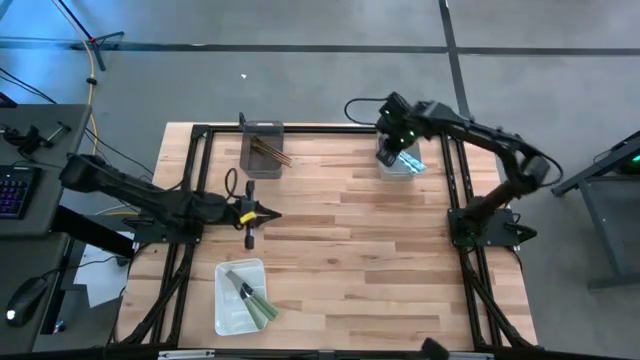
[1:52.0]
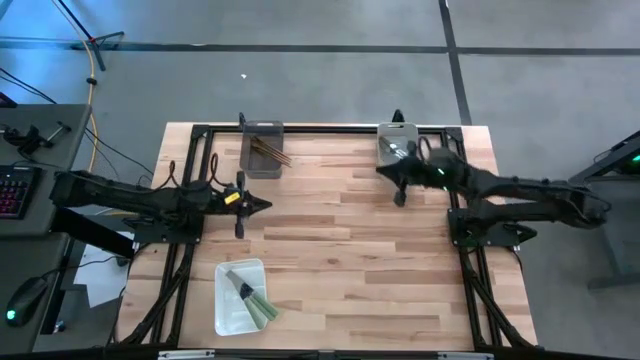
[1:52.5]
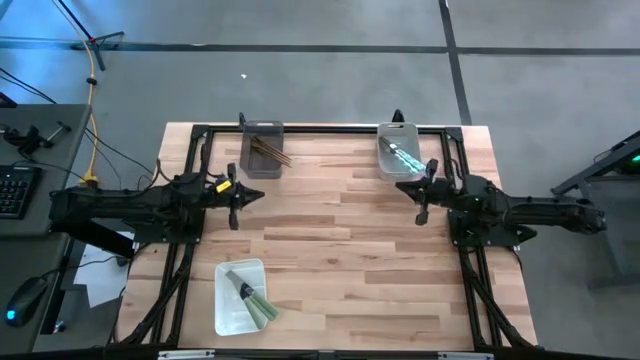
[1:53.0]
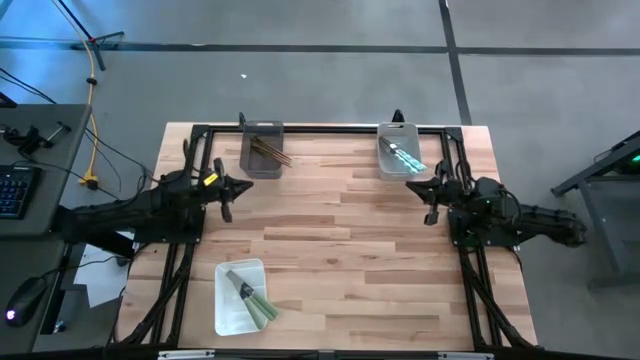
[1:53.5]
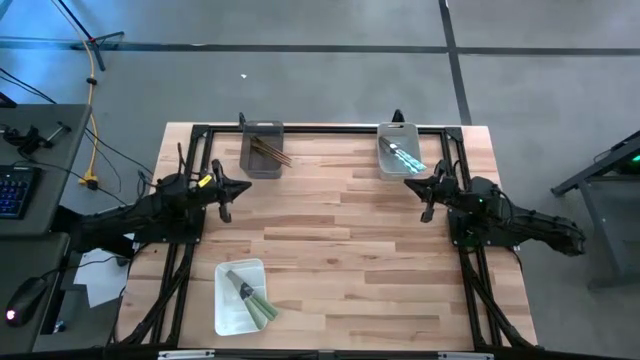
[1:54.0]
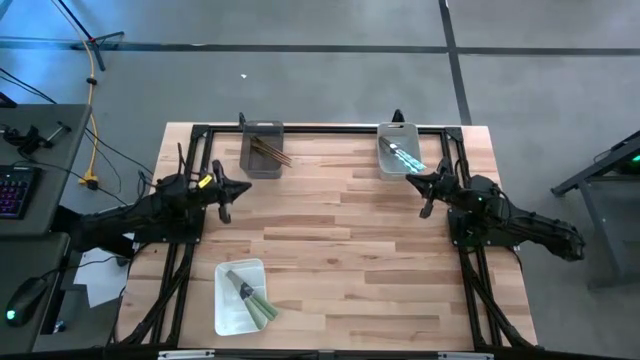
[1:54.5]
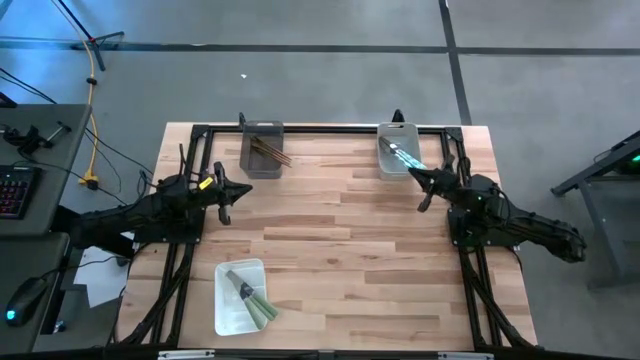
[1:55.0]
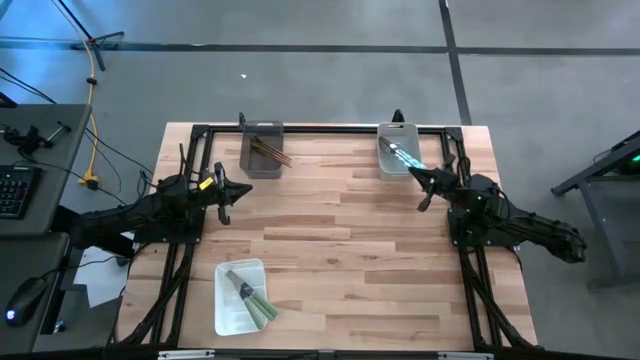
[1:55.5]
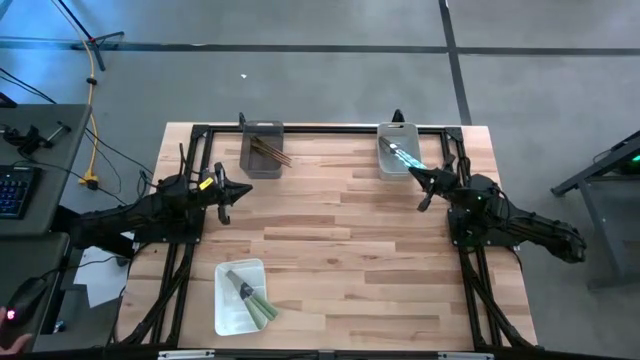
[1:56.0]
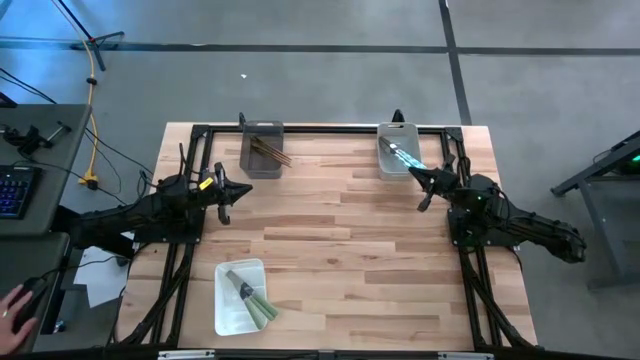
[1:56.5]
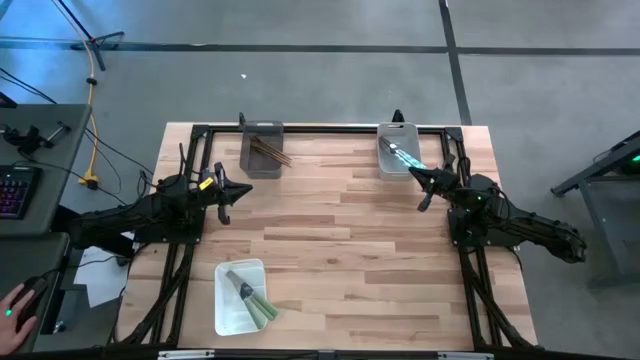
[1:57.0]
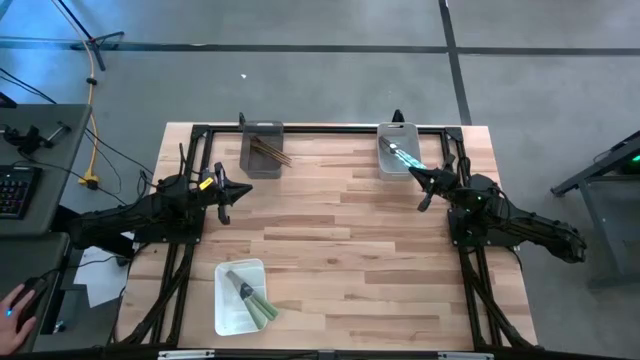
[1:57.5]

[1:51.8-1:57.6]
Task: Sort silverware by color (type)
Return to Home Position

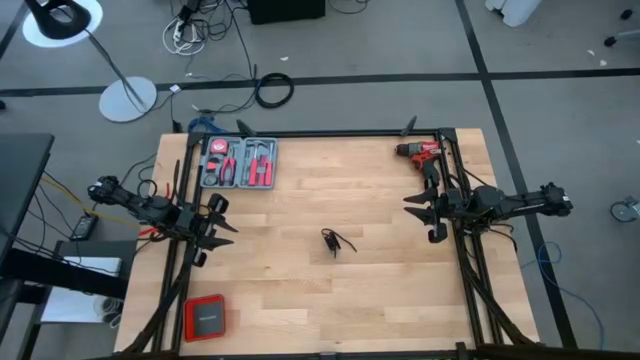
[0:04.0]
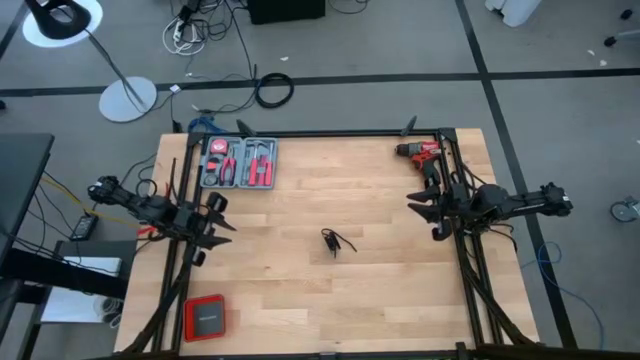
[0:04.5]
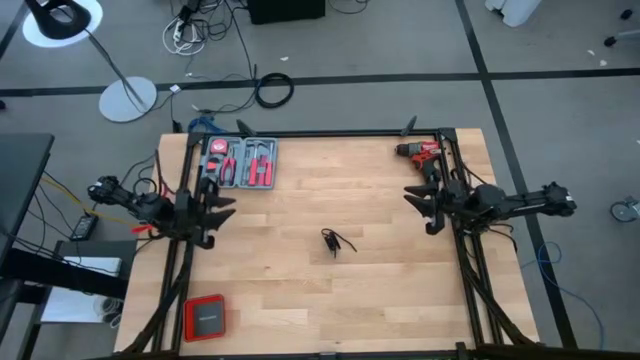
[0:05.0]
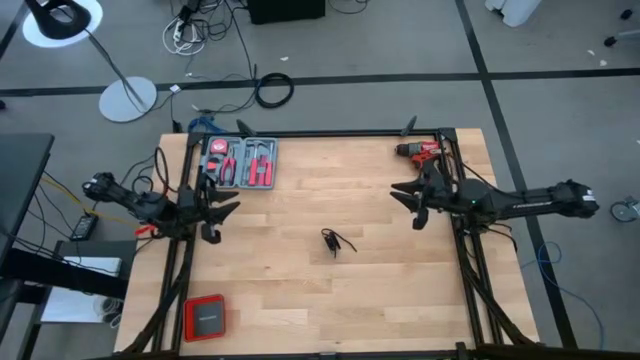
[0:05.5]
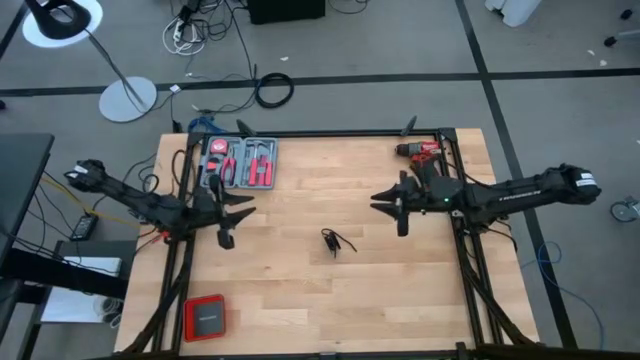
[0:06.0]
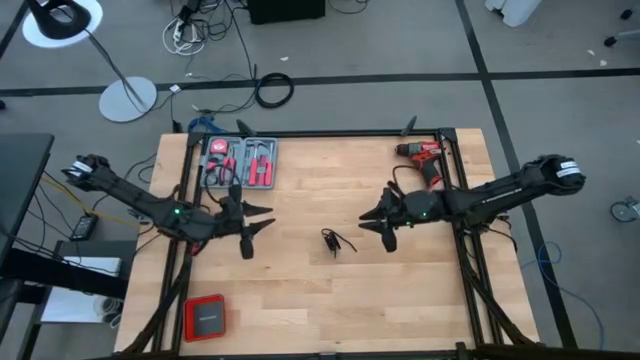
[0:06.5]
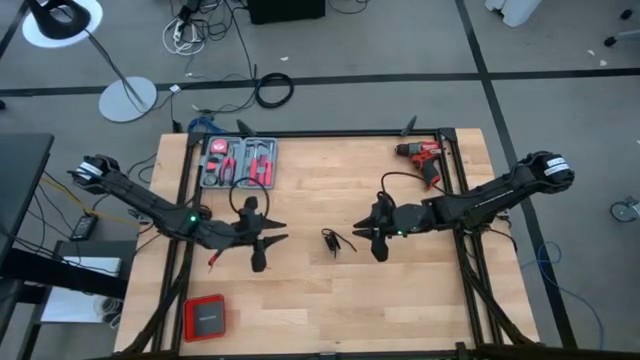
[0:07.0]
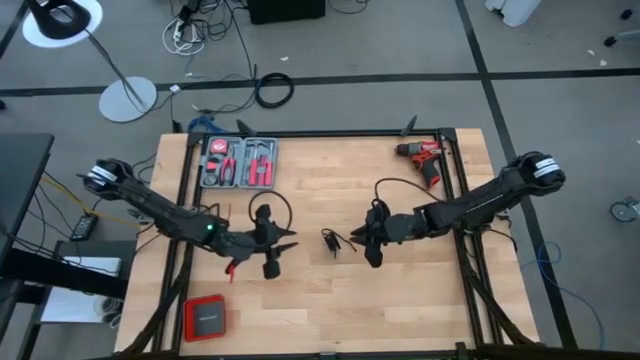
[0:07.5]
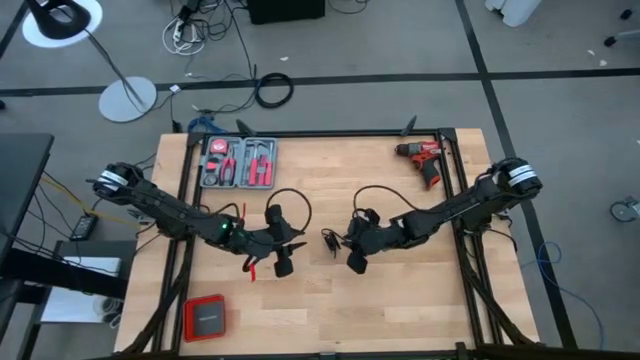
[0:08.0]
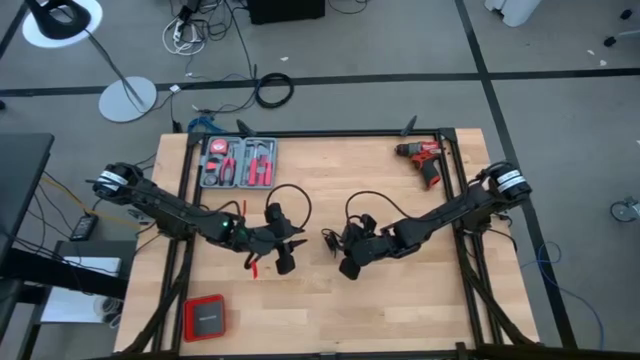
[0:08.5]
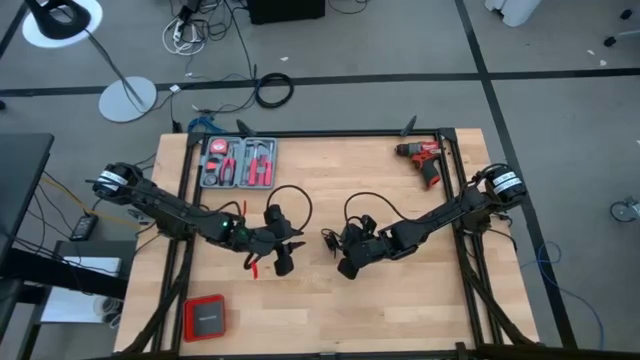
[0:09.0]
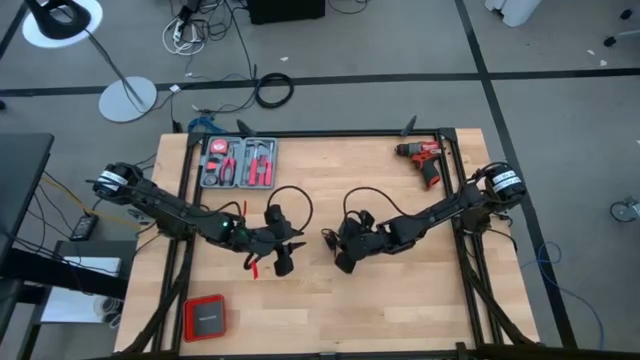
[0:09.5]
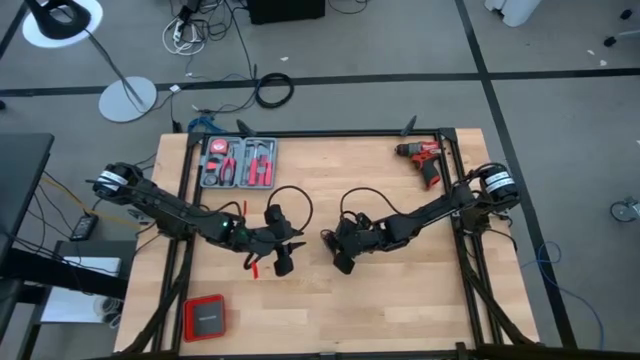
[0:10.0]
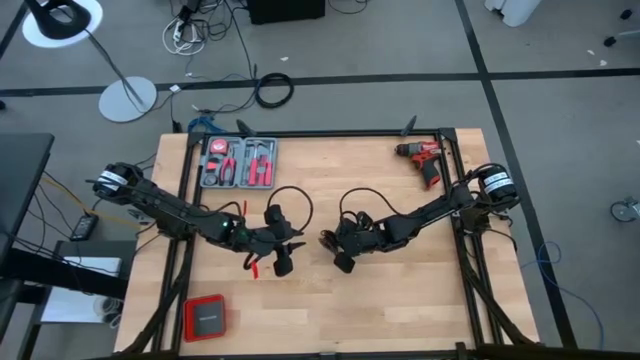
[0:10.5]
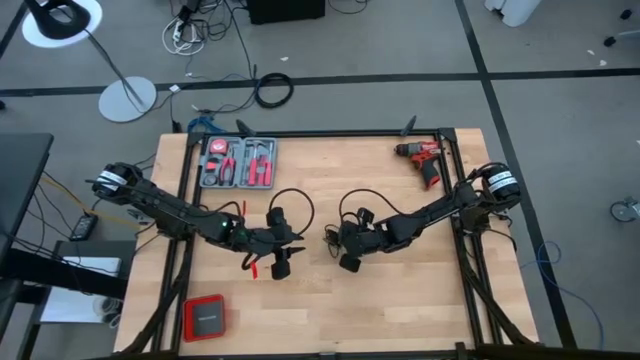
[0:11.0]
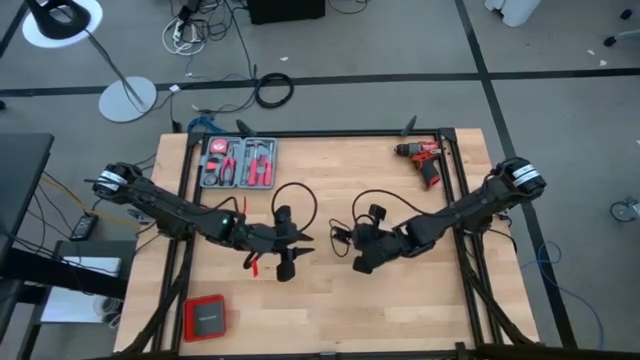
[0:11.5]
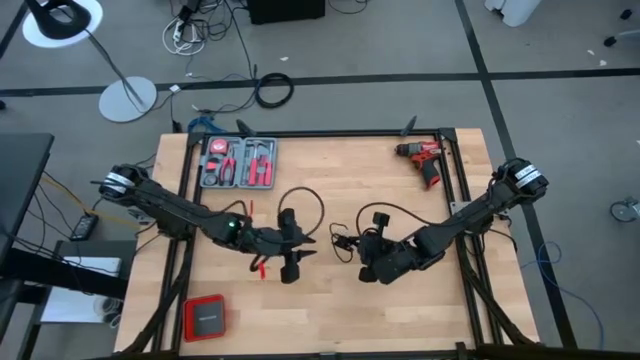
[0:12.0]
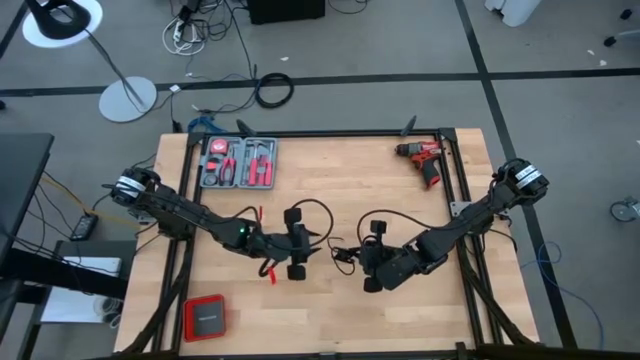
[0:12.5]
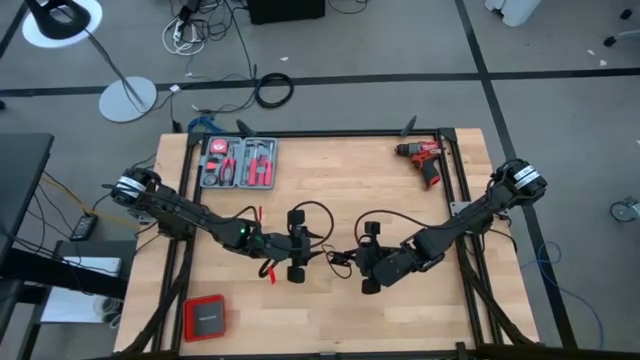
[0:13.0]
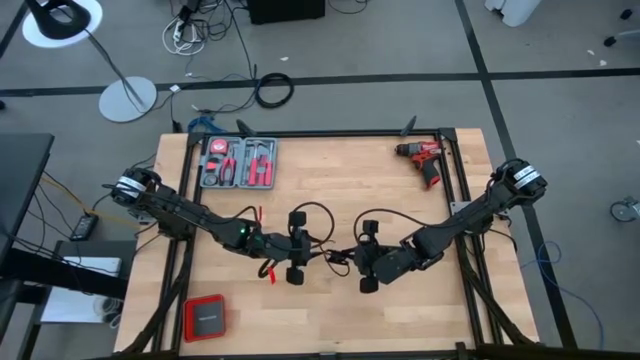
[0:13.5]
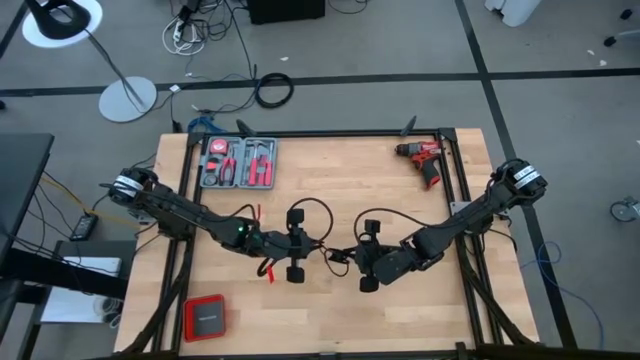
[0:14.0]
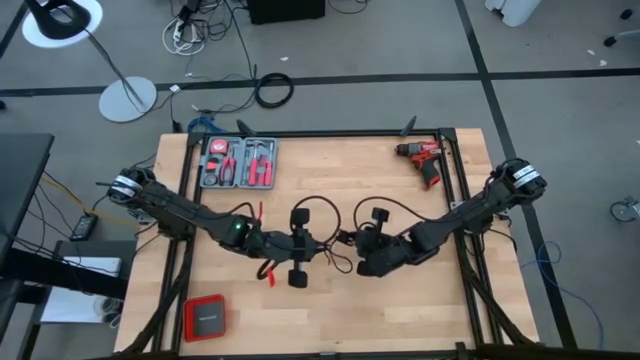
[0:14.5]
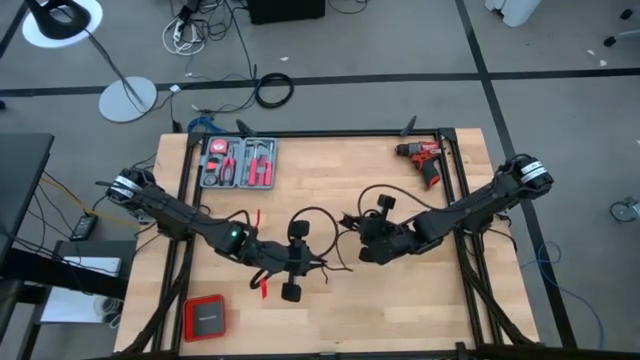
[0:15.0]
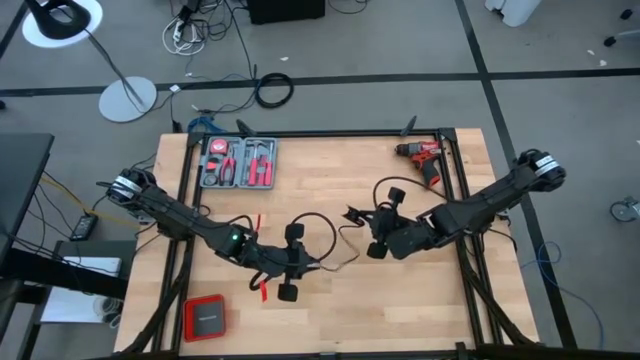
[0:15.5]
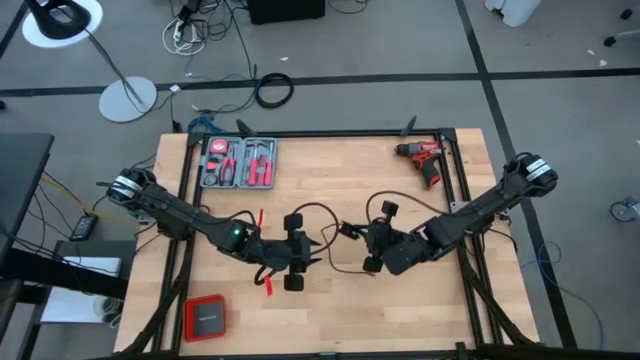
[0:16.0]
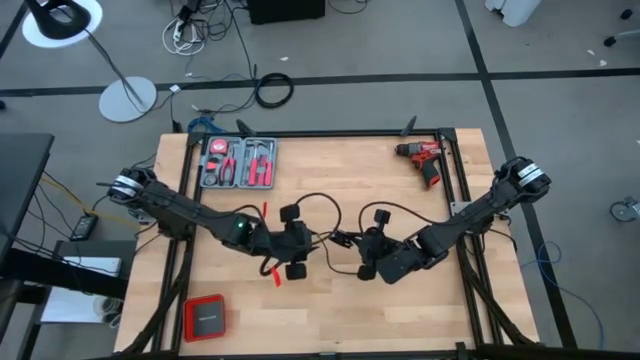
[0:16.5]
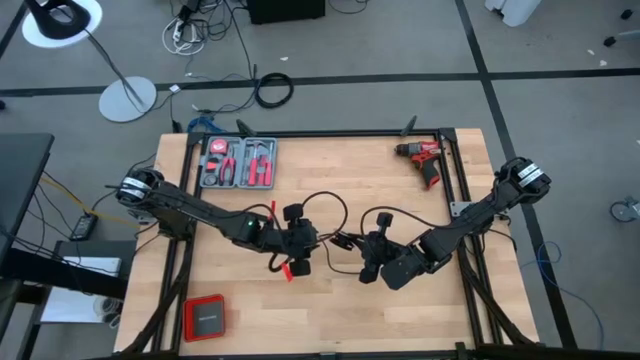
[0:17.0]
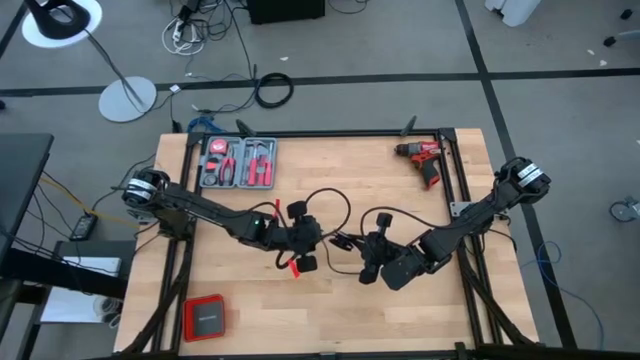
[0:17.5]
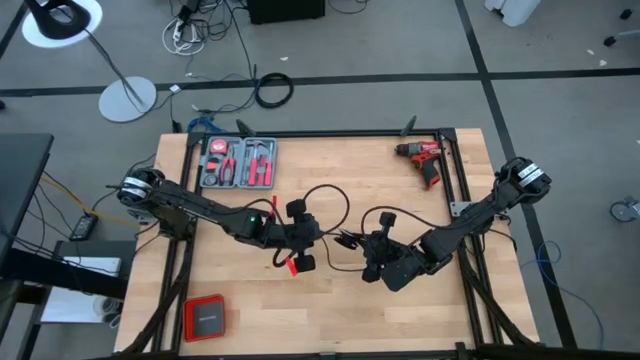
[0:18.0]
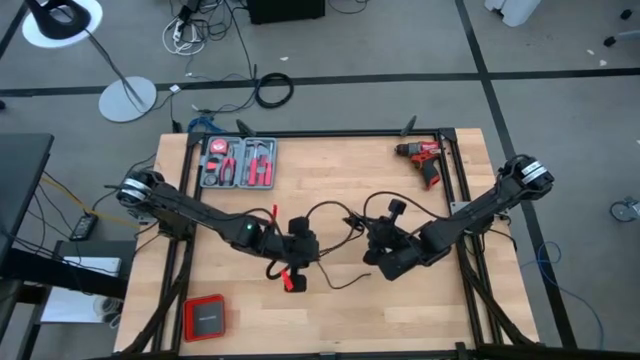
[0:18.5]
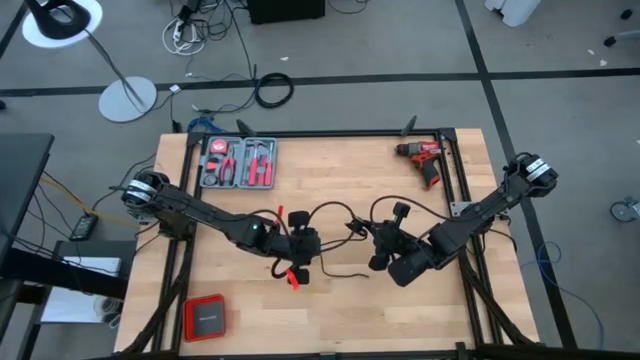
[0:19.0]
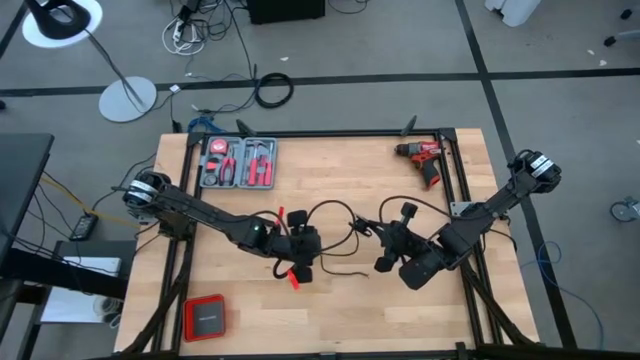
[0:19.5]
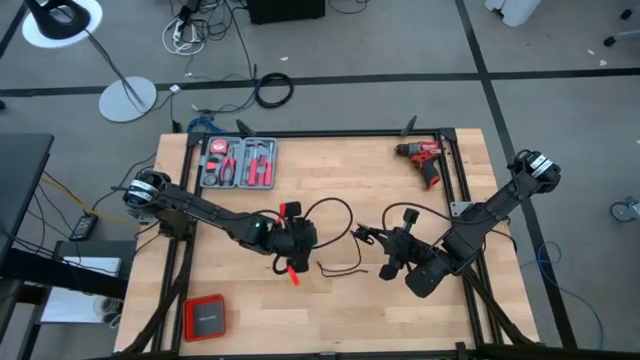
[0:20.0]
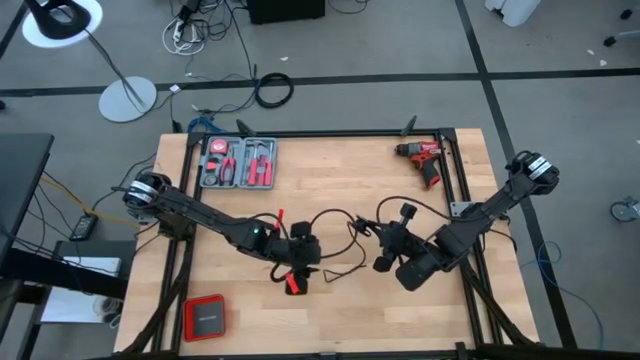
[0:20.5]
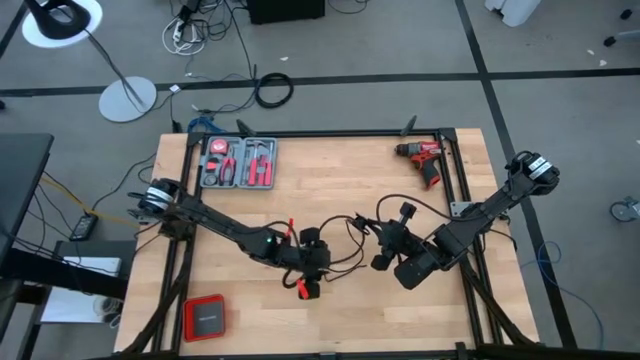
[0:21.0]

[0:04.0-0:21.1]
Task: Coil cords
Uncoil the black wire on the spool
